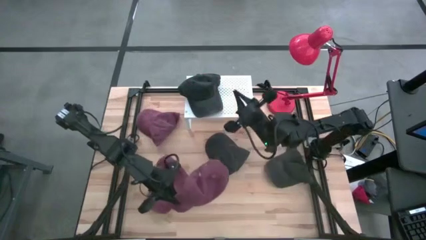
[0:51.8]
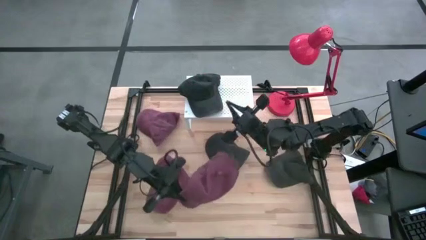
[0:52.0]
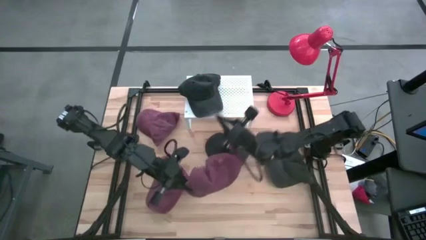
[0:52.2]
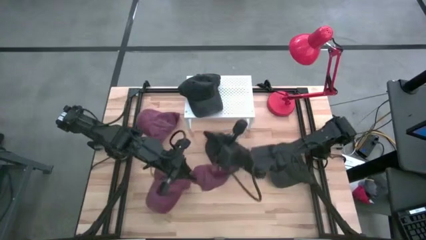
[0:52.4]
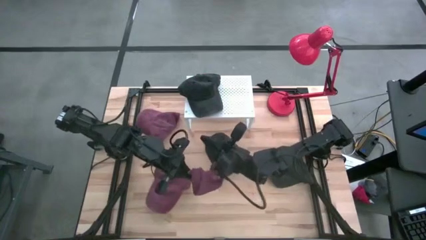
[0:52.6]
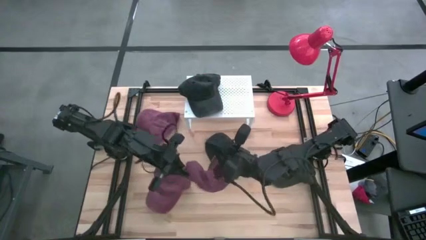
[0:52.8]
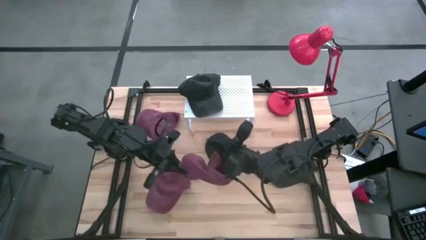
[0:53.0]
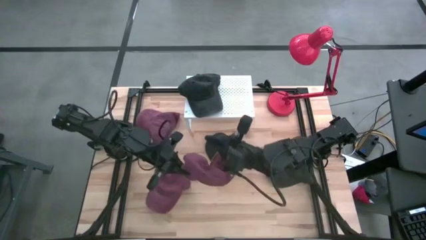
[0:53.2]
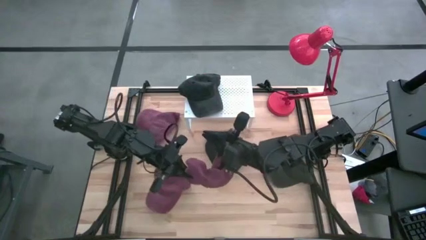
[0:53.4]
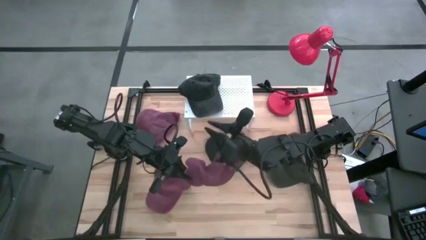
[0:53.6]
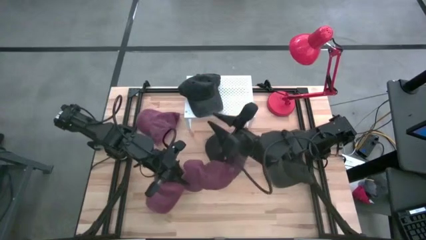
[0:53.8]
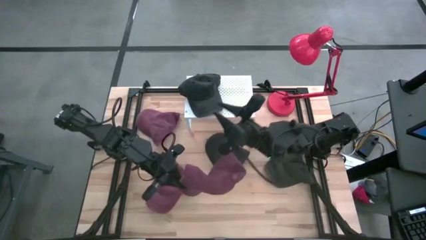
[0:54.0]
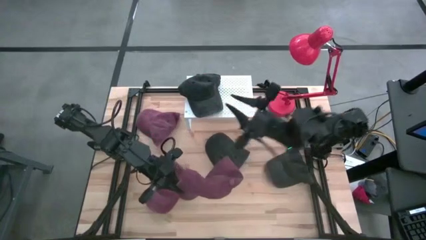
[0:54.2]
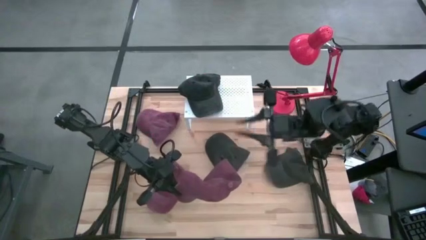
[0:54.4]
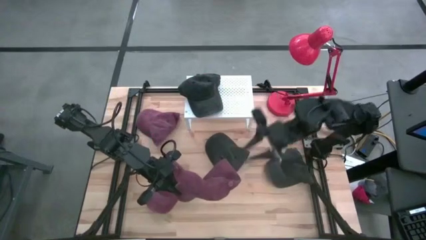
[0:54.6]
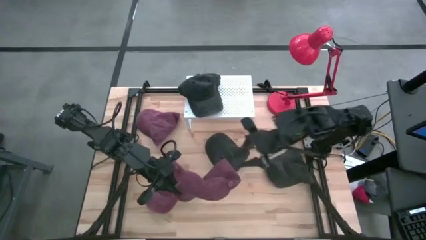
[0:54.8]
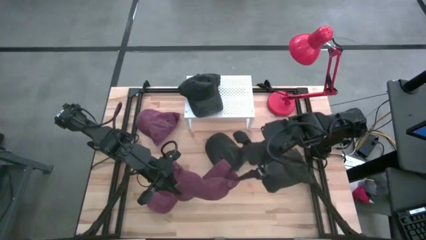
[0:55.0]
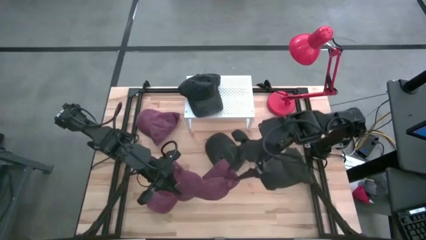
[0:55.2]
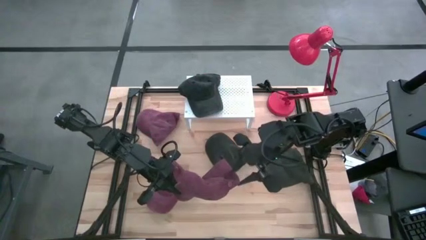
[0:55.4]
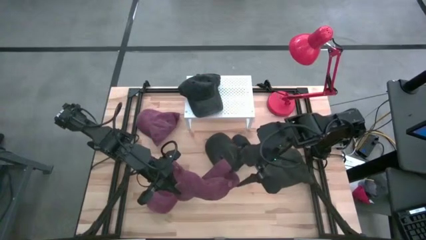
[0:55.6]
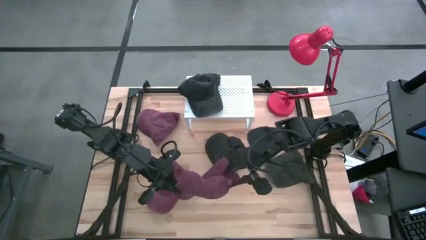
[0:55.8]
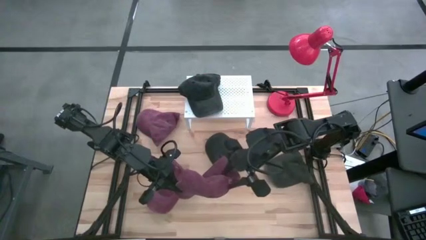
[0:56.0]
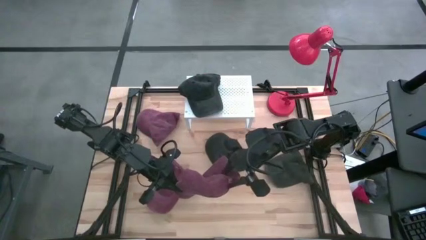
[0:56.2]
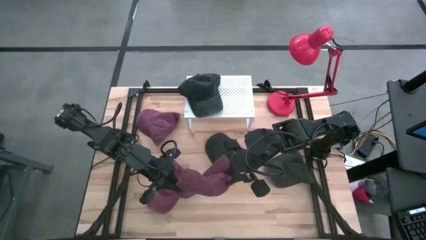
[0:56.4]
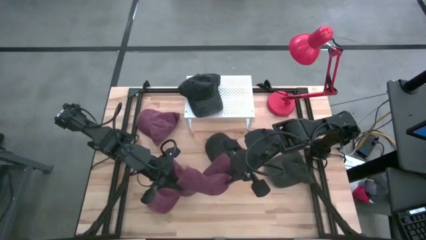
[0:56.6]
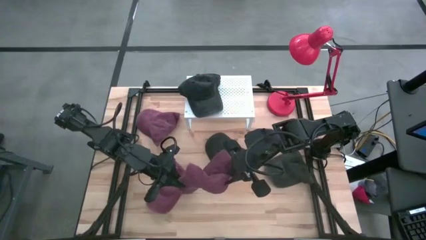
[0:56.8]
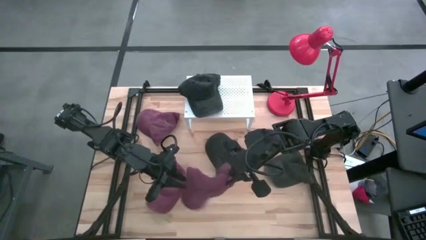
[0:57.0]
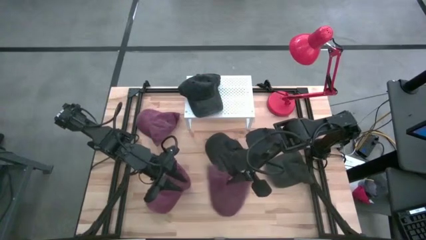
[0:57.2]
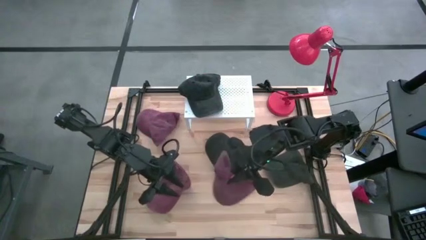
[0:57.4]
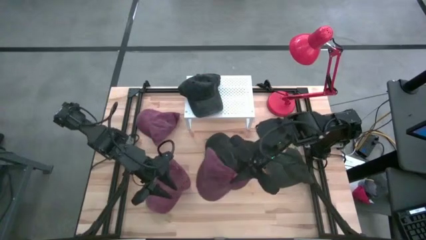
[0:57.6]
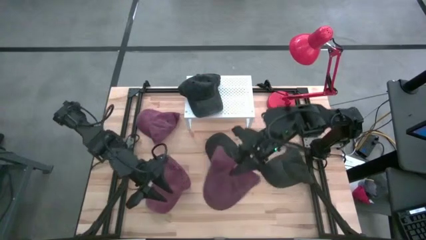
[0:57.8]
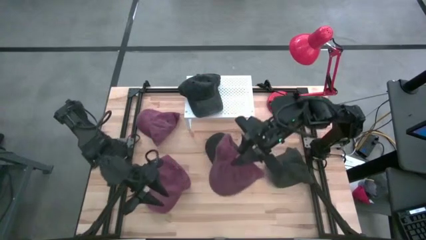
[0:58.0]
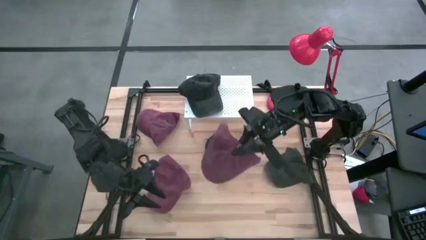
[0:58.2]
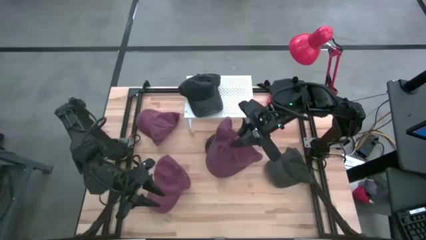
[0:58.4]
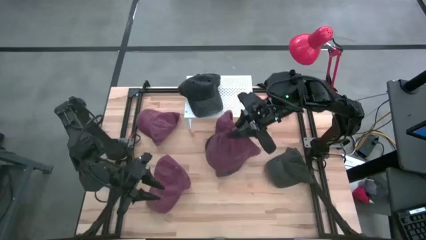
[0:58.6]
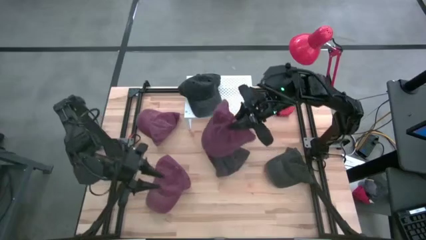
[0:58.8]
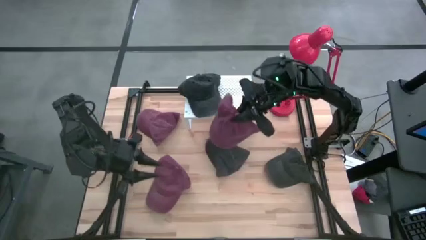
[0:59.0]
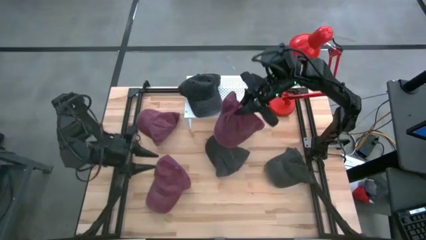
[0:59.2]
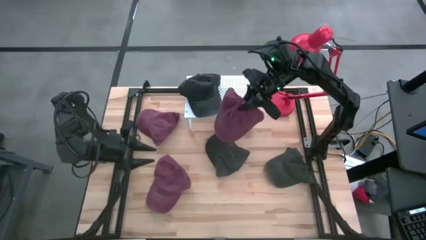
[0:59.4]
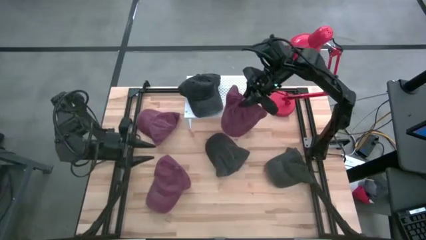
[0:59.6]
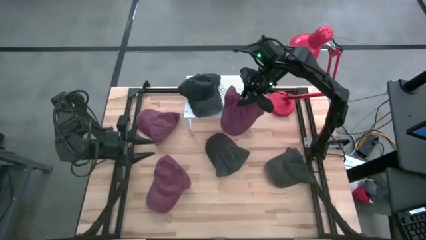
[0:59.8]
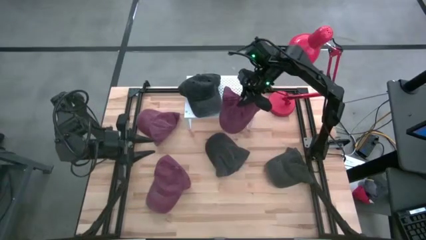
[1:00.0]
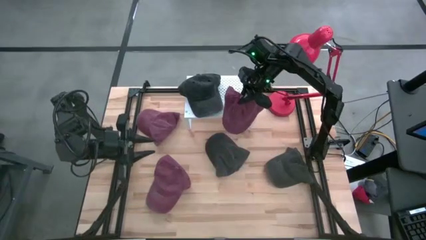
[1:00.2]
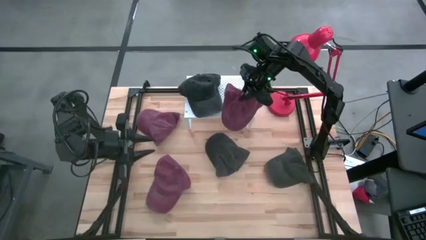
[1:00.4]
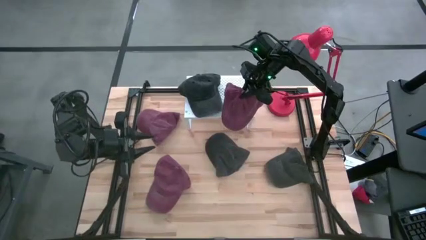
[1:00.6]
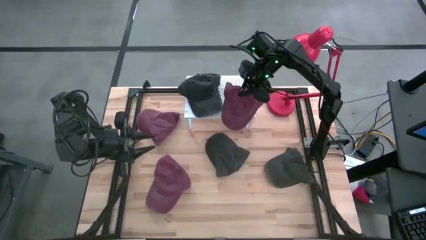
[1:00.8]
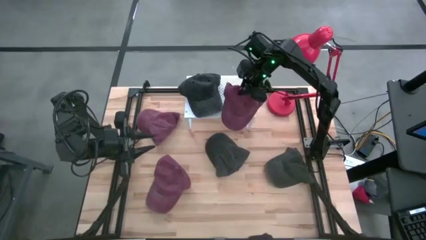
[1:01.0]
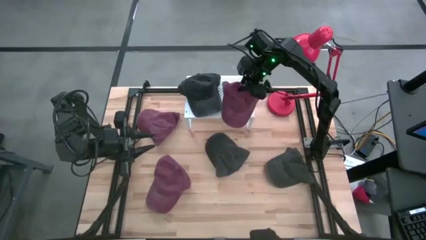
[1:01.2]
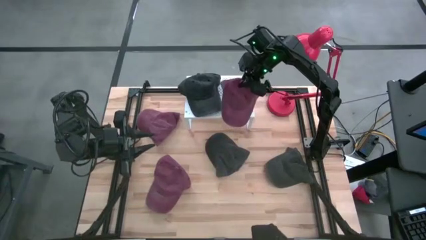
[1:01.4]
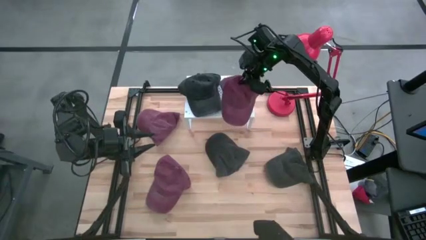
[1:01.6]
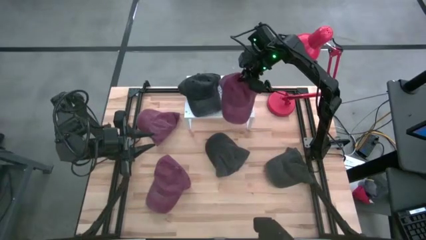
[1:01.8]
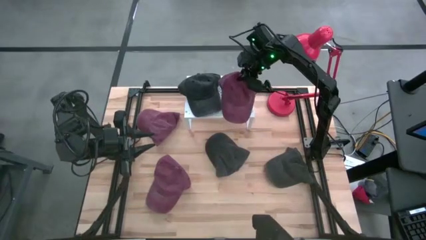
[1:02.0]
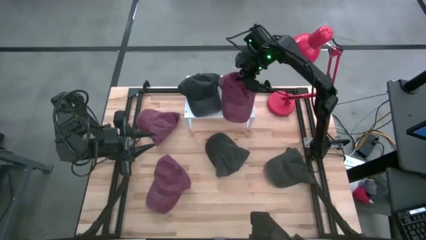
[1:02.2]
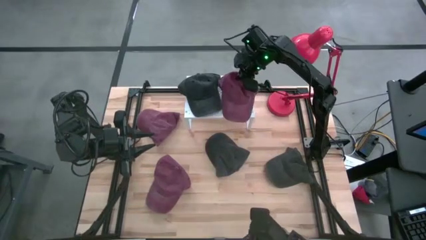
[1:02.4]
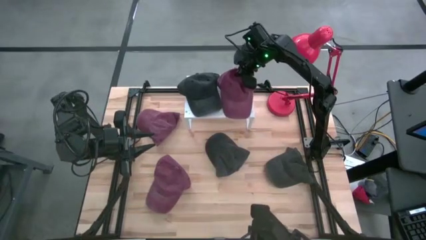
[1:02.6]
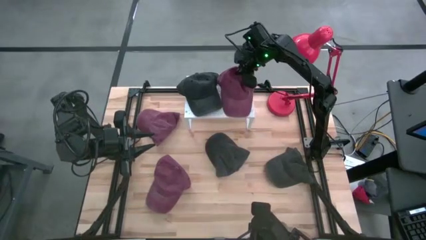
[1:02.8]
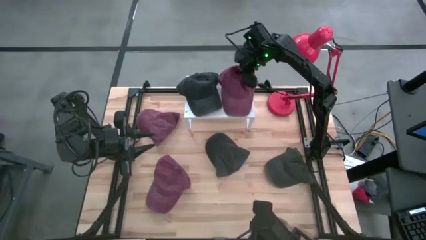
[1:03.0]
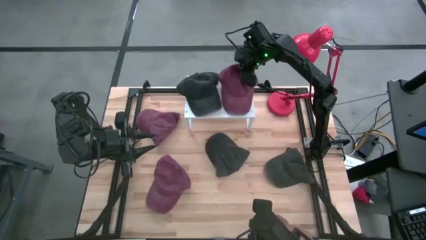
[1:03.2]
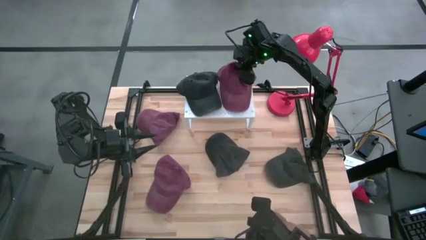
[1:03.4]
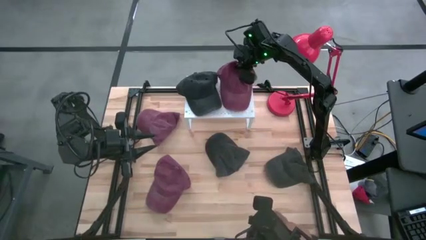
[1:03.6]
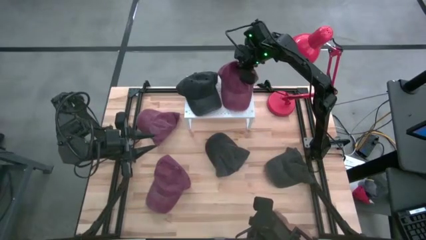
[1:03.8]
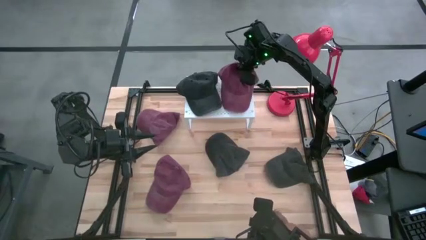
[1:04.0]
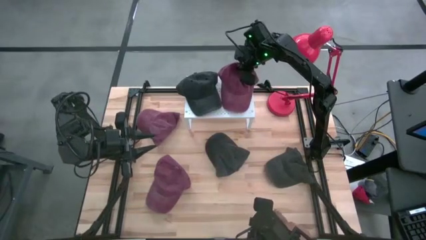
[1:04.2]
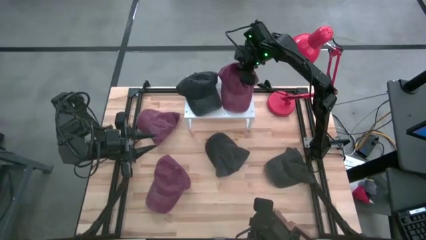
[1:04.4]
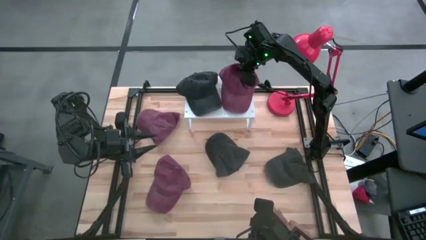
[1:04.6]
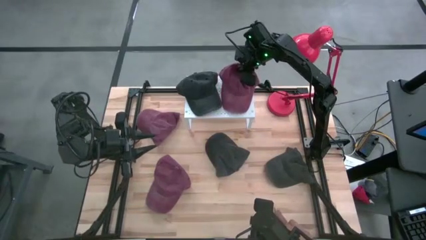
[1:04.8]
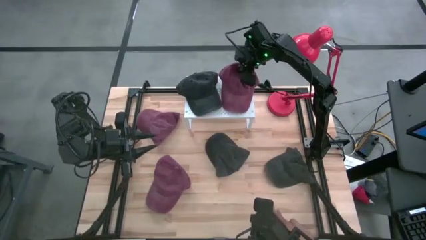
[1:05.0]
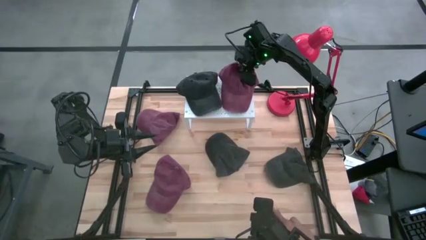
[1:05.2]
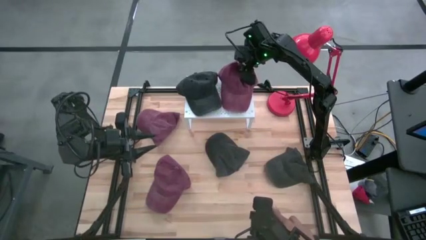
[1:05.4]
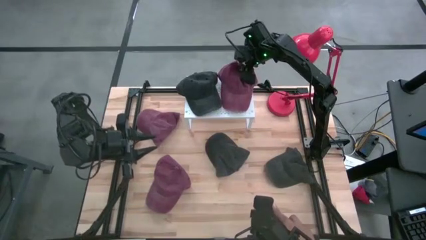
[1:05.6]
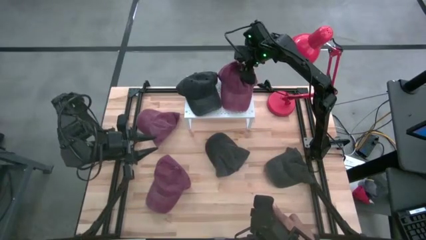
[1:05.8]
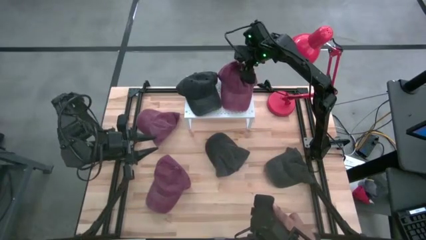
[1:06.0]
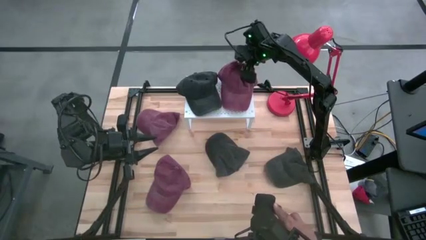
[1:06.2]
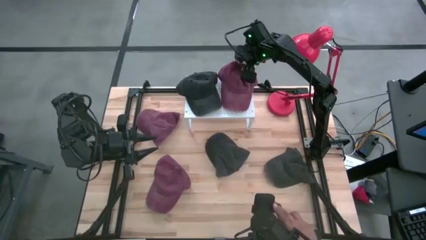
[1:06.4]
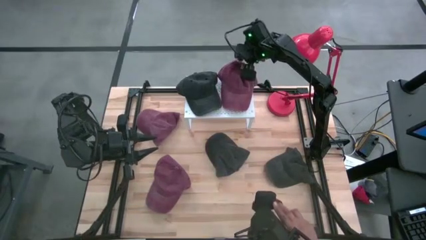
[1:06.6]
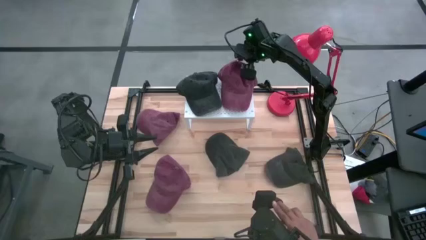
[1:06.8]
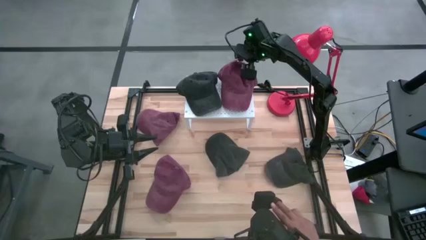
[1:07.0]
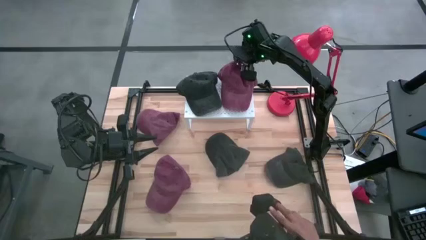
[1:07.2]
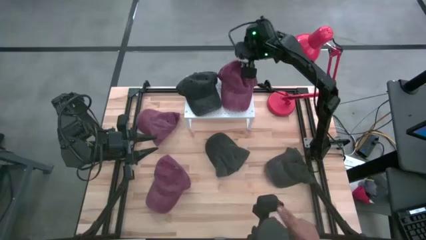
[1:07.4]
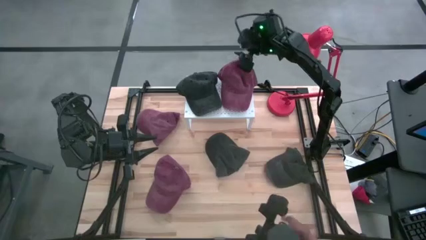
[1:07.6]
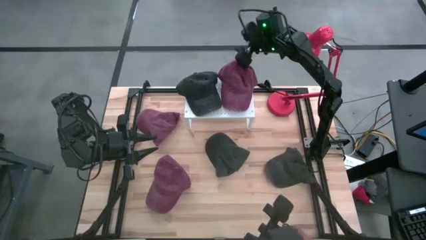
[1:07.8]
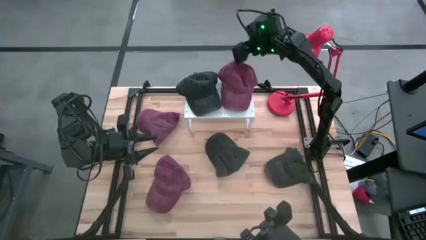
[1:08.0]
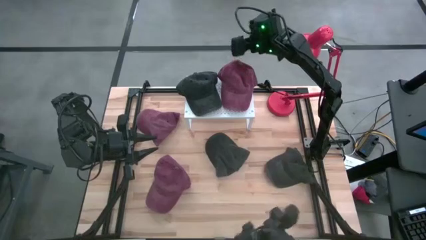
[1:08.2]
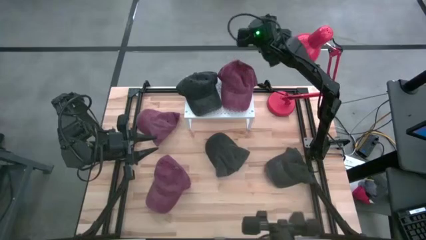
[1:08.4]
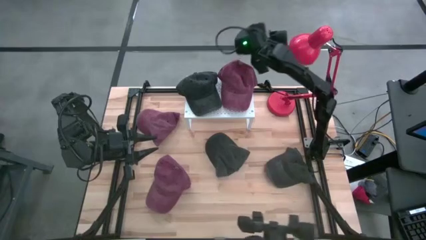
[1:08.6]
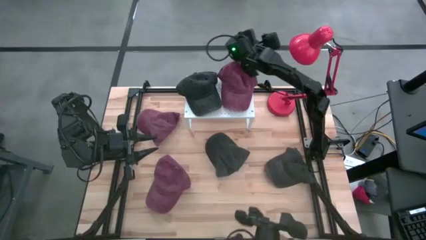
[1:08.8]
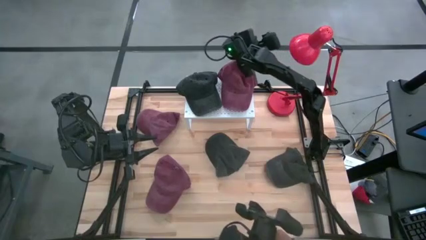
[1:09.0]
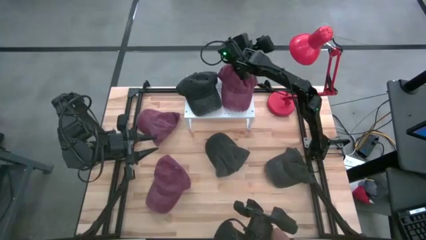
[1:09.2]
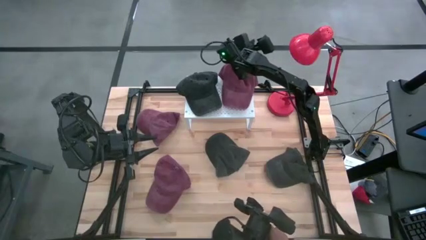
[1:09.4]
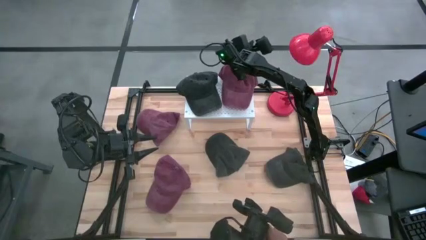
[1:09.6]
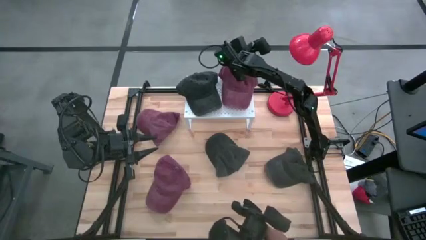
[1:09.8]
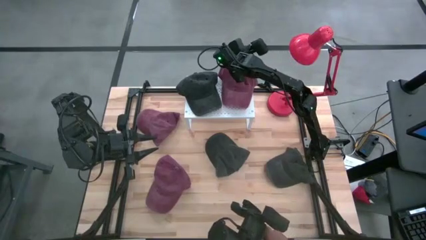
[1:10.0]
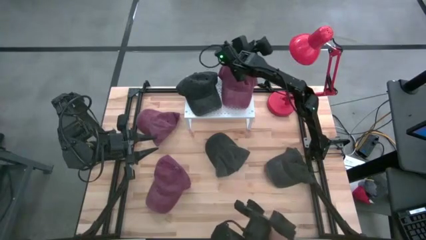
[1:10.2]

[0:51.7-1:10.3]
Task: Pick & Place hat
Put the middle red cap on the shelf
